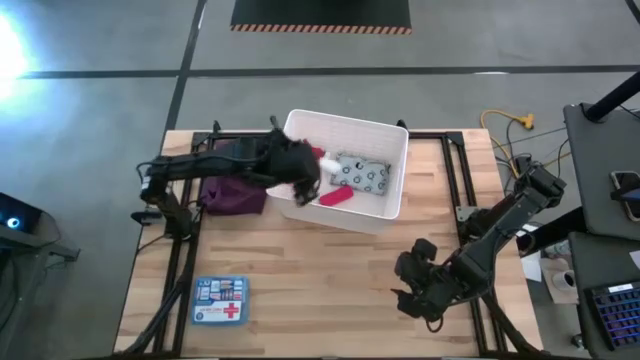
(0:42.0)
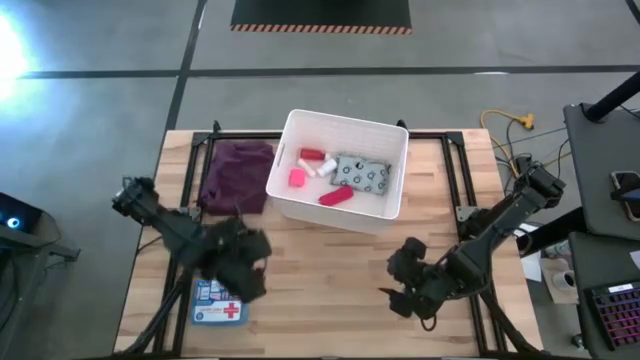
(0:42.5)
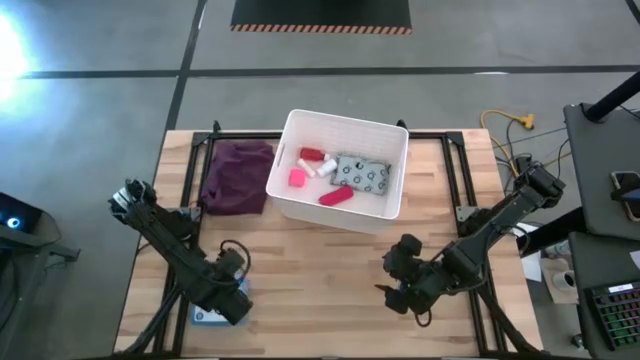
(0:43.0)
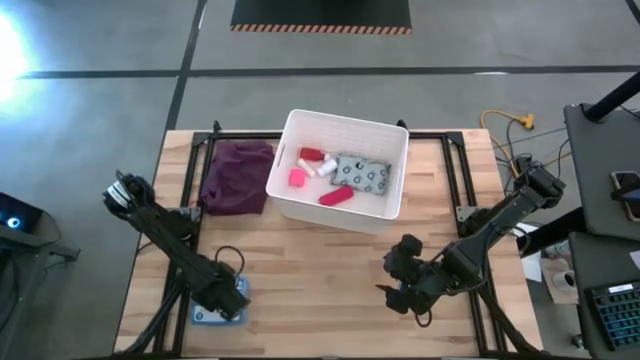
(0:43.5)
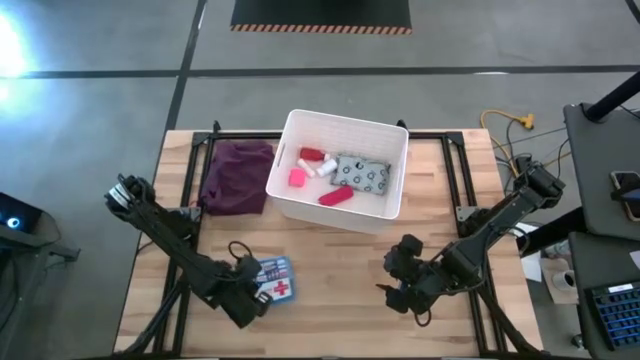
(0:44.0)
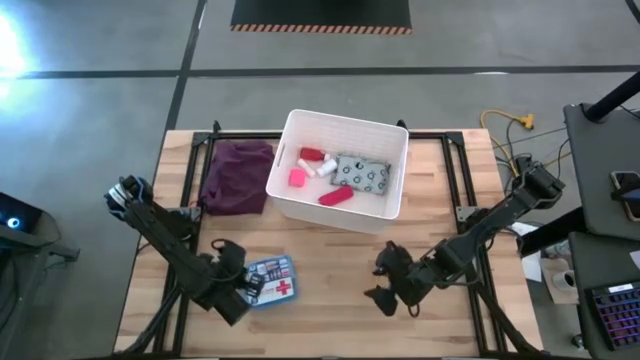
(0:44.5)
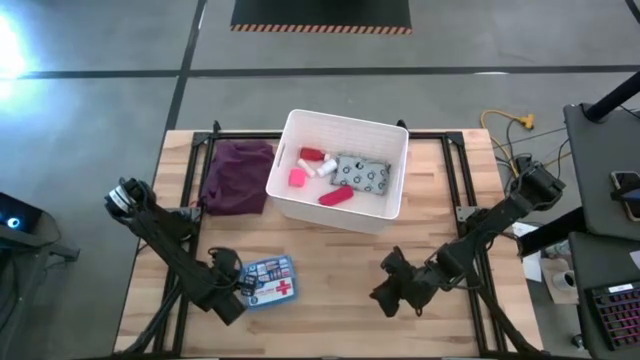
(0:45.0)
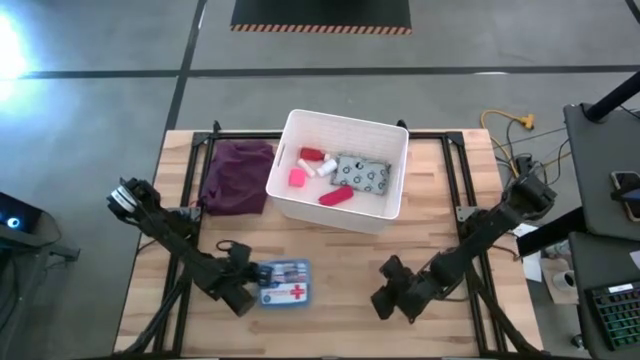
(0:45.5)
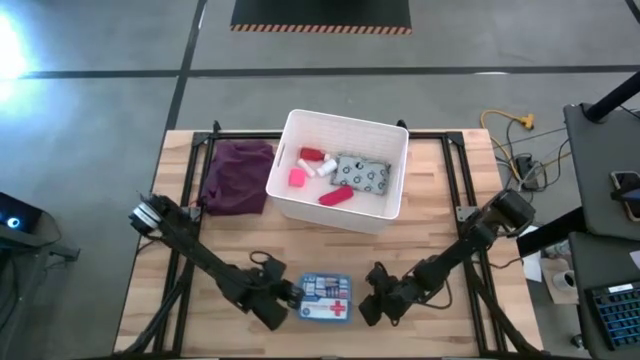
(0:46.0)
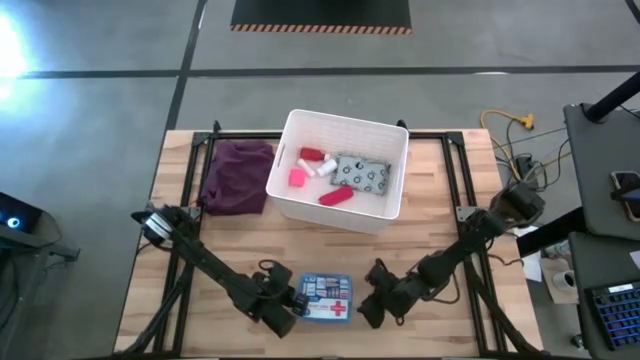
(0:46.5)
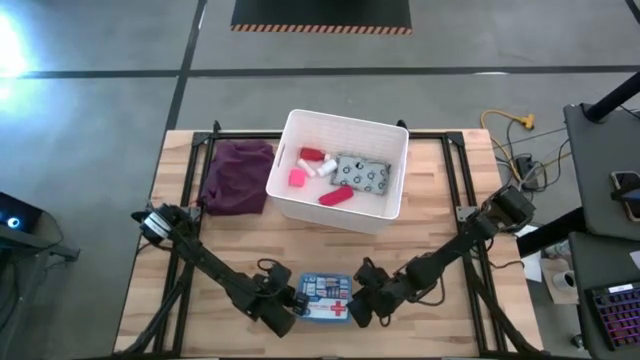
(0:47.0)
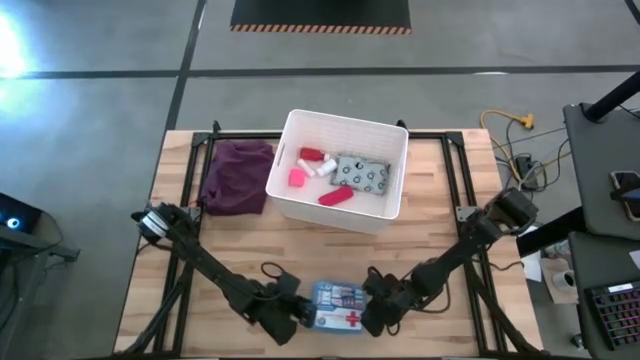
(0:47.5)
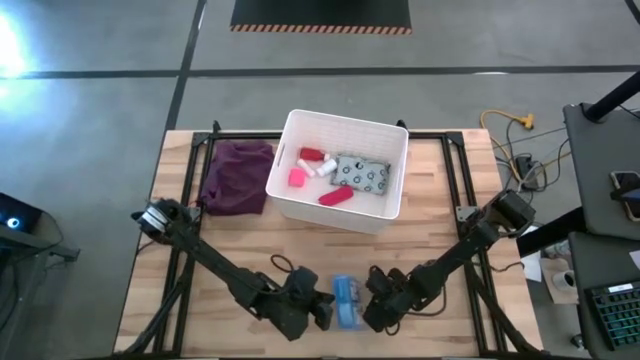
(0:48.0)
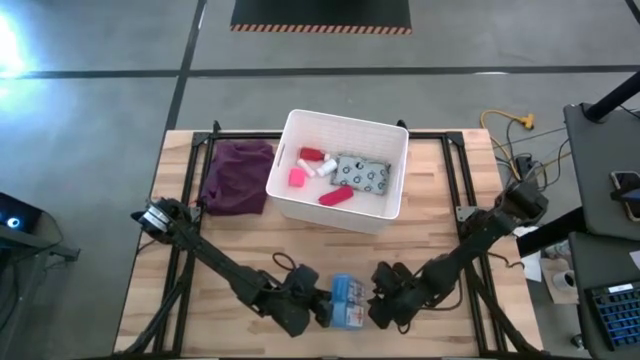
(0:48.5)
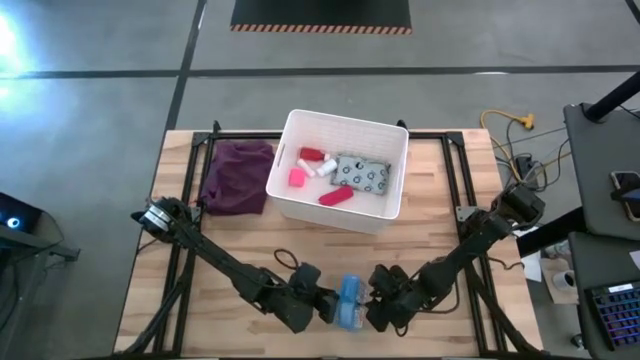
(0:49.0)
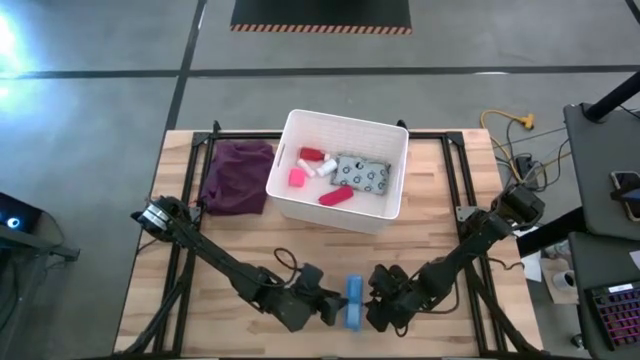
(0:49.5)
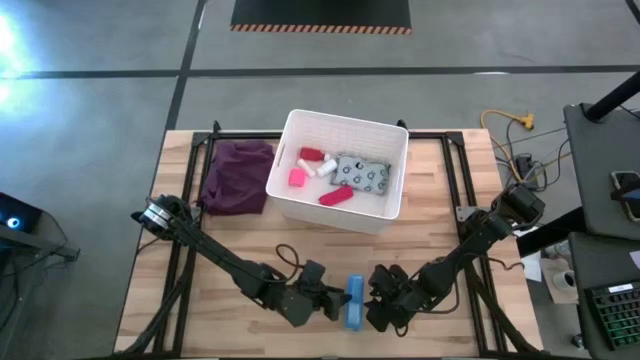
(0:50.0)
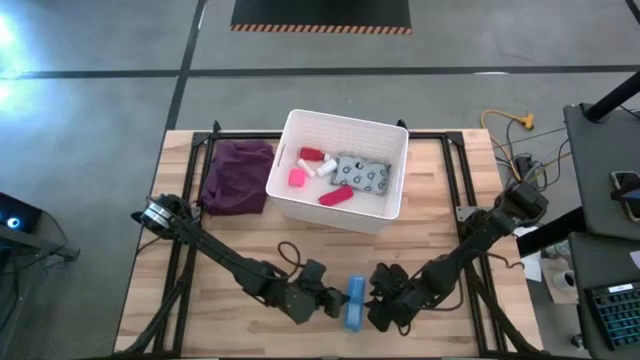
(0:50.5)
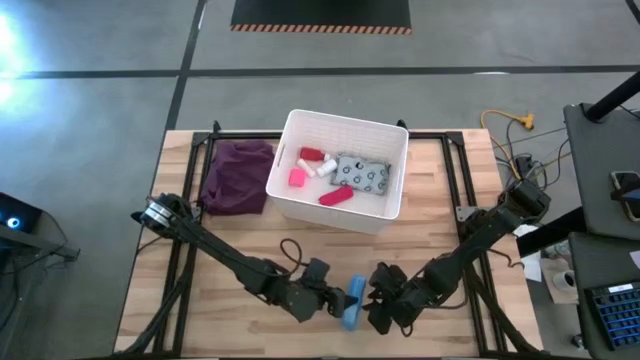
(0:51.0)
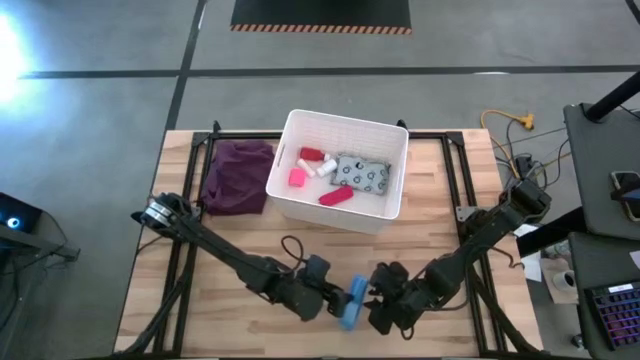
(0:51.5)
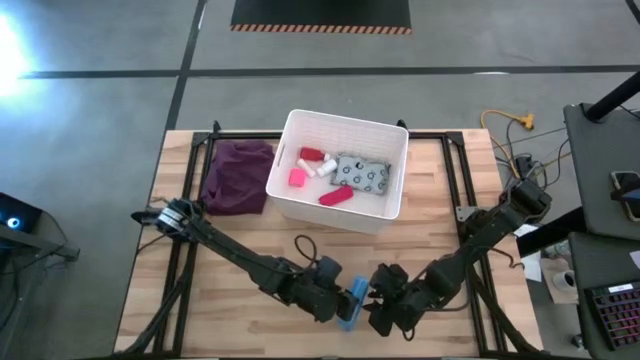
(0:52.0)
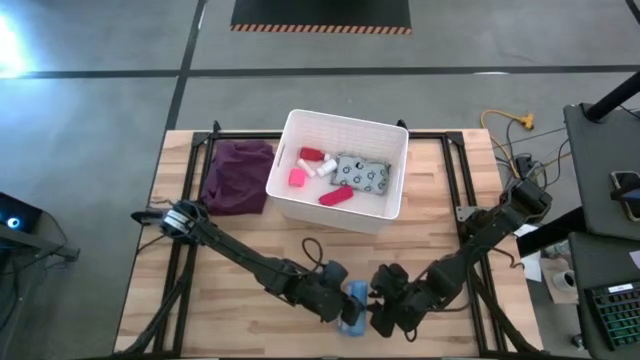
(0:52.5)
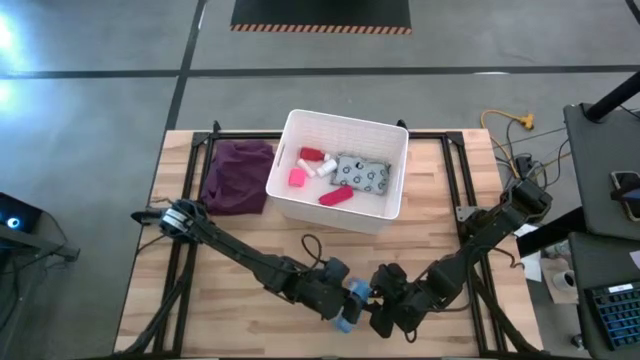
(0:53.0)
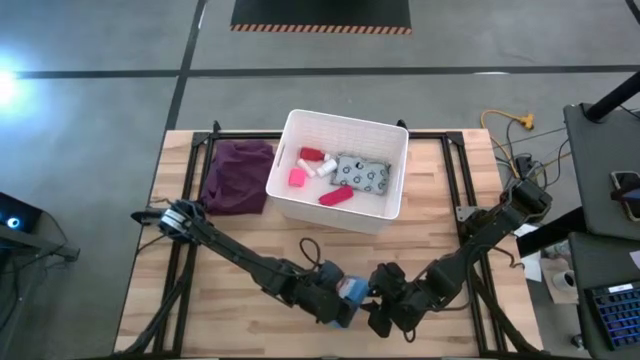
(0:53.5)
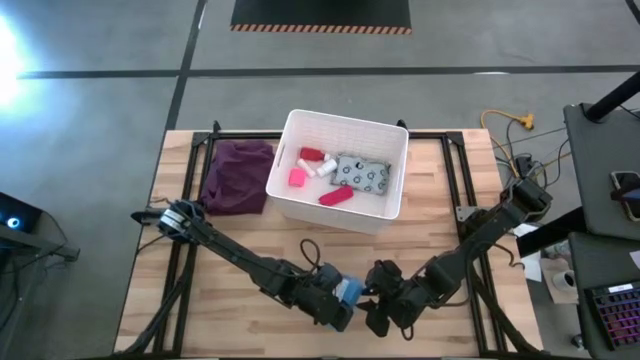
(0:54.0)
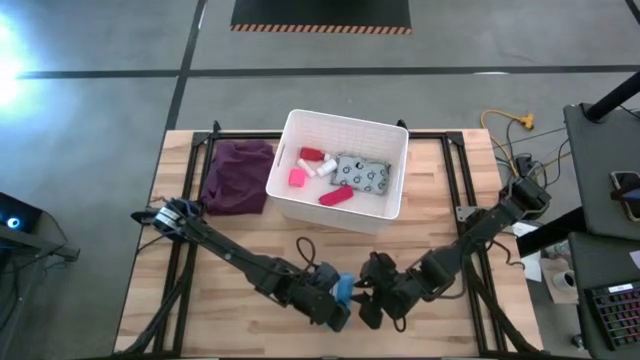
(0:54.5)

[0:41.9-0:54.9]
Task: Pick & place medical supplies in basket/bin
Put the blue medicine kit into the white bin

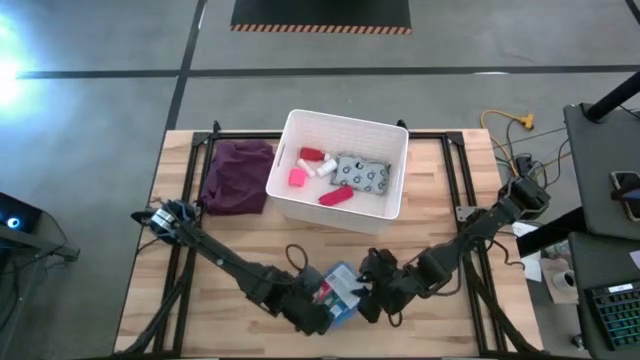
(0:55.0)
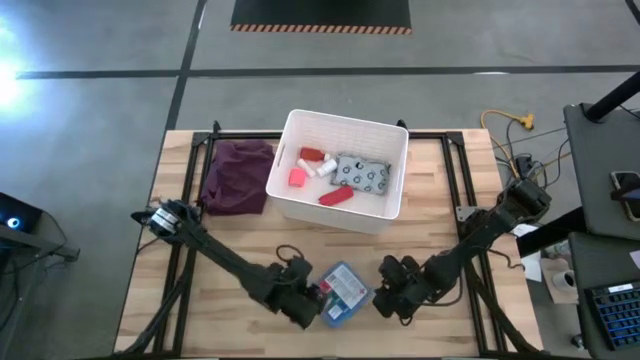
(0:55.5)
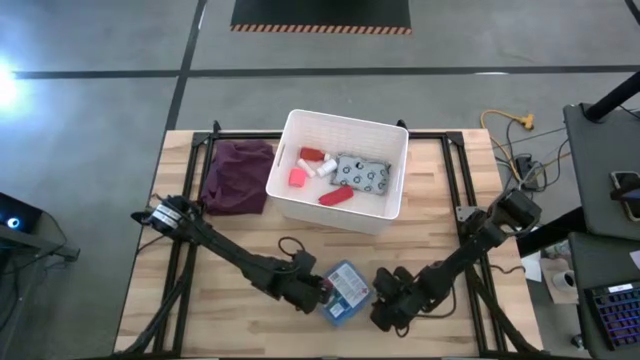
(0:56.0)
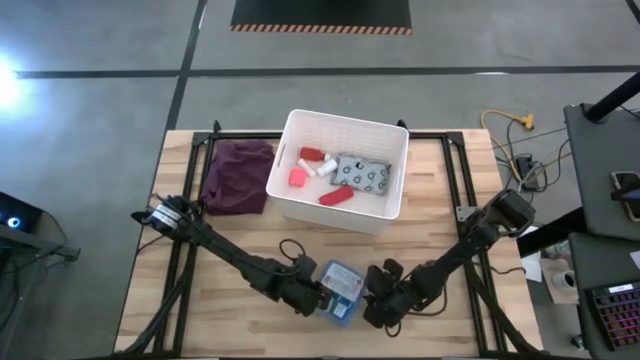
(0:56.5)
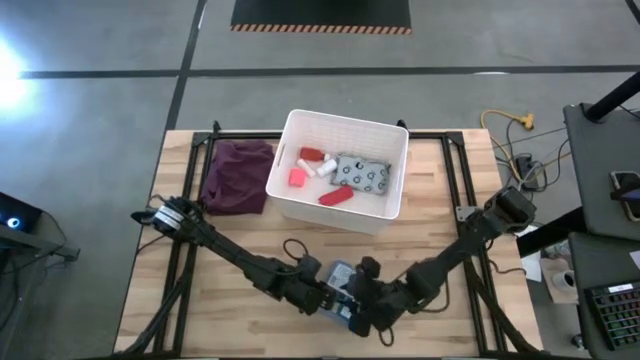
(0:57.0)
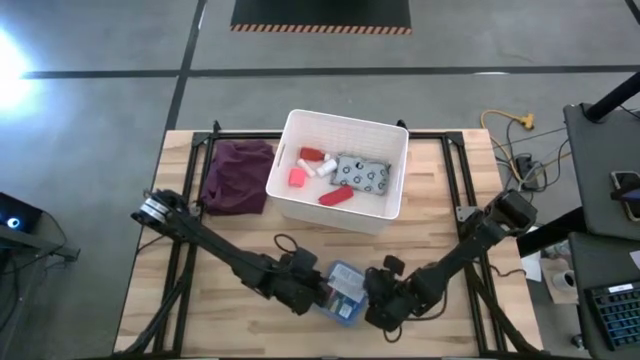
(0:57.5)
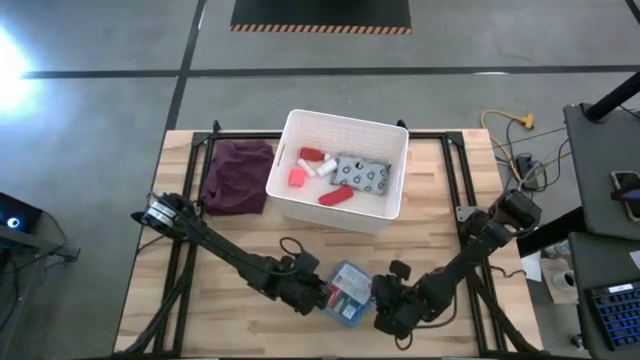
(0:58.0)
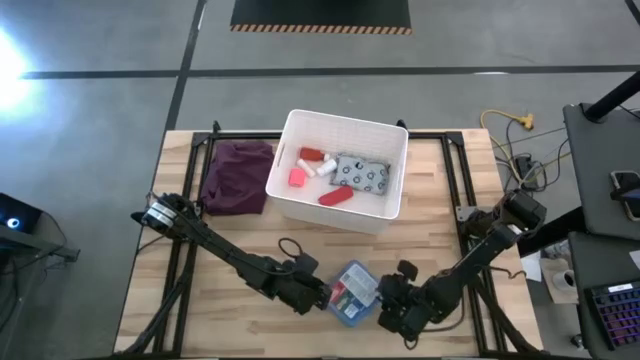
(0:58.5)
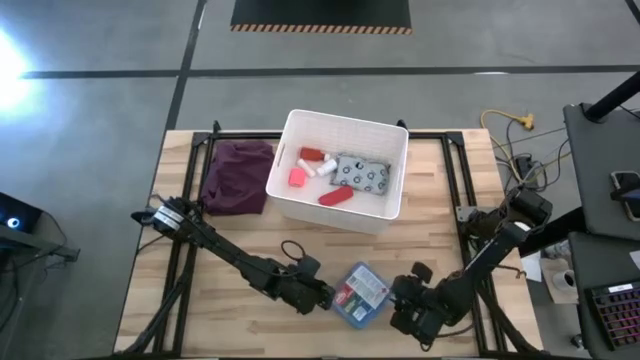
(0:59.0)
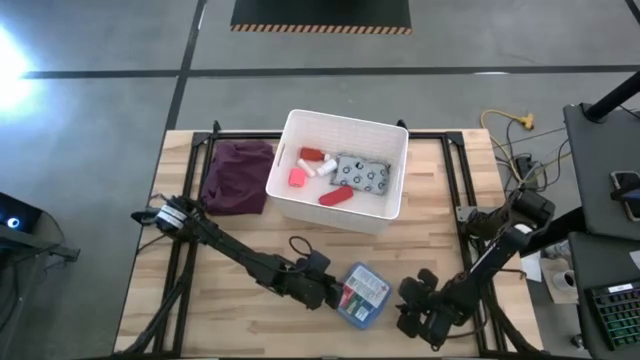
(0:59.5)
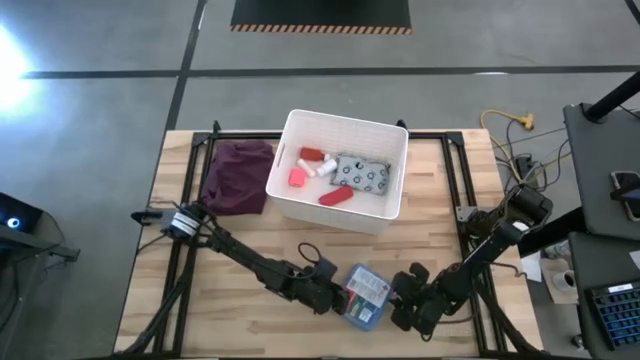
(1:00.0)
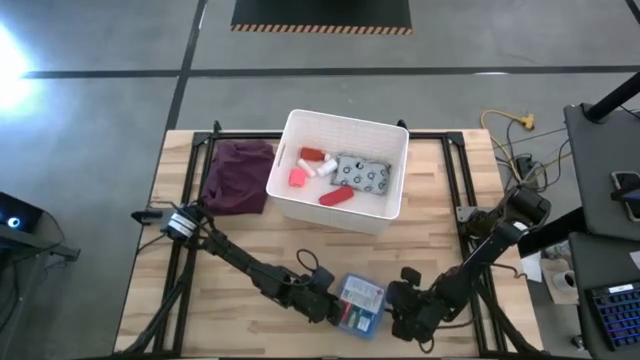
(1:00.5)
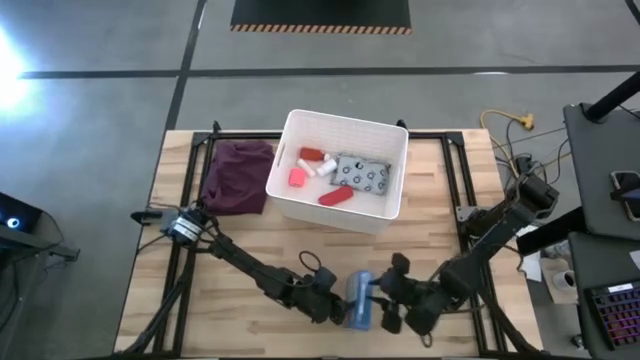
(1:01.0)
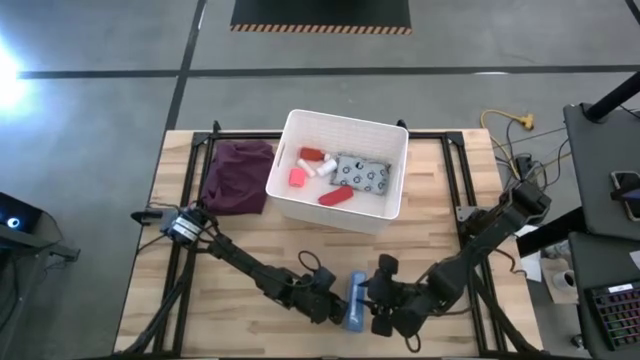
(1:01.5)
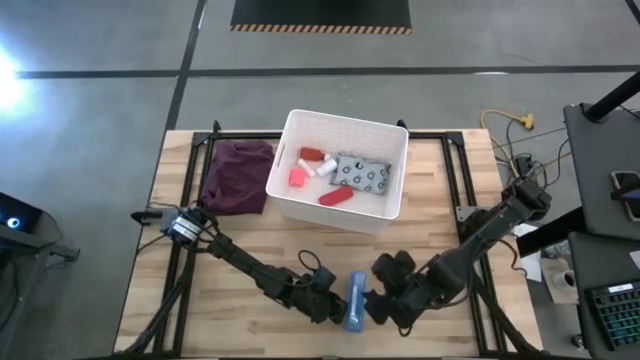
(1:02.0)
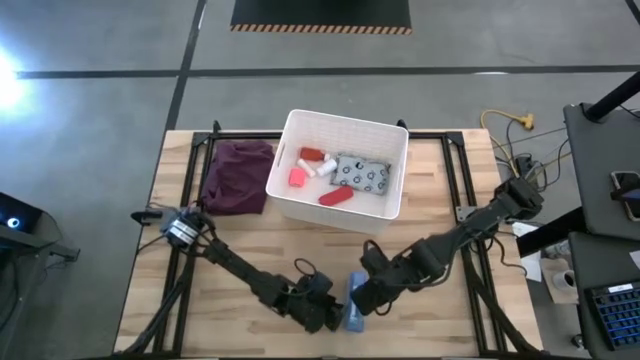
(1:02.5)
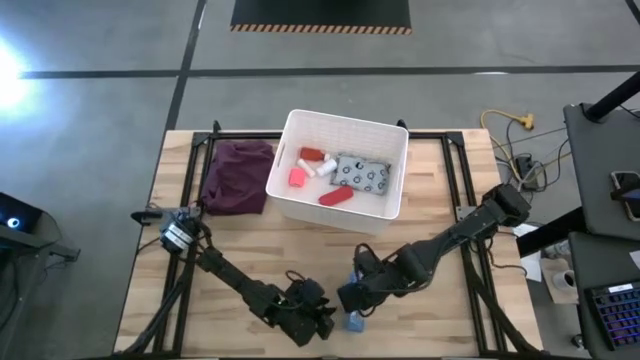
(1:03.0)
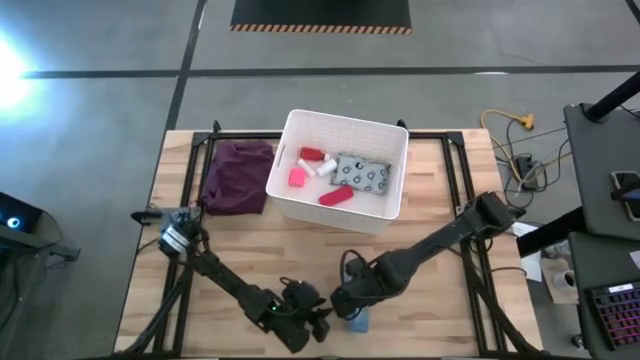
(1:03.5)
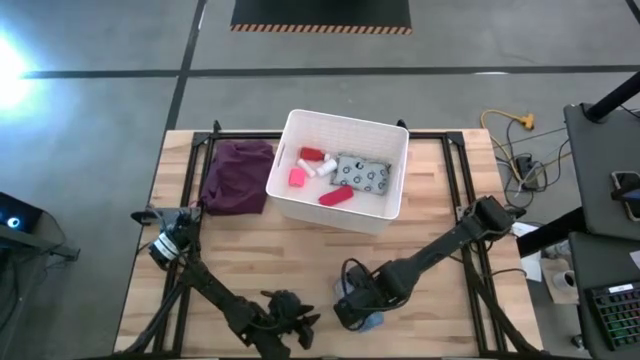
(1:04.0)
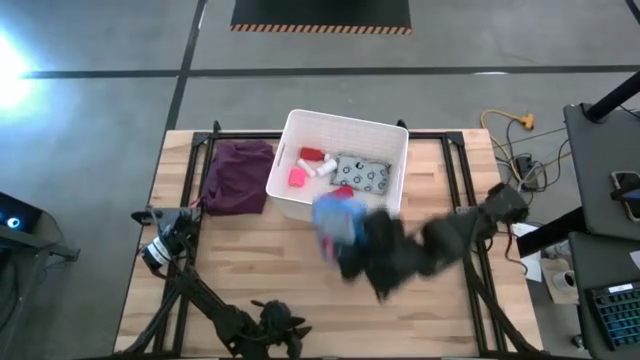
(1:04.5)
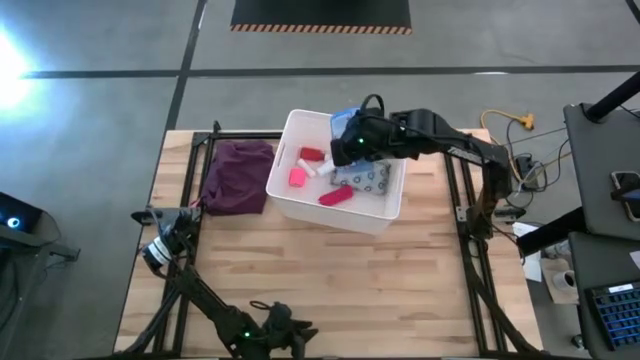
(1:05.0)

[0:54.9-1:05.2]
Put the blue medicine kit into the white bin
